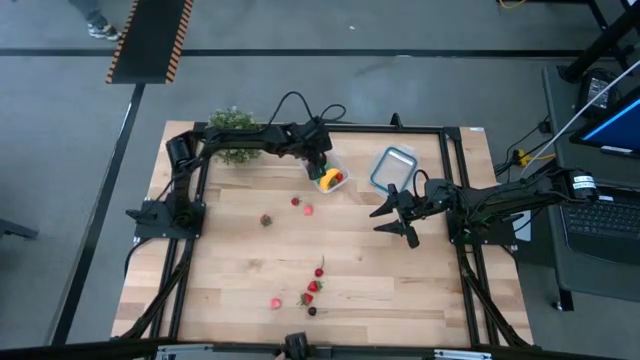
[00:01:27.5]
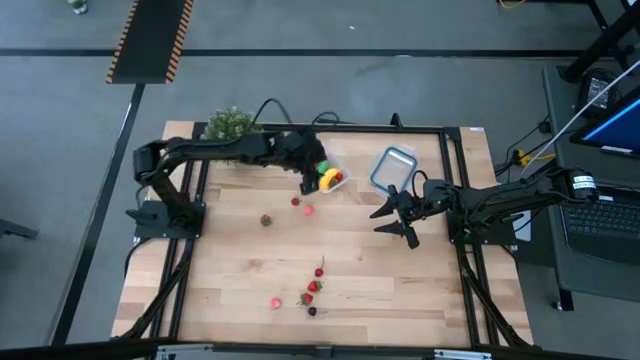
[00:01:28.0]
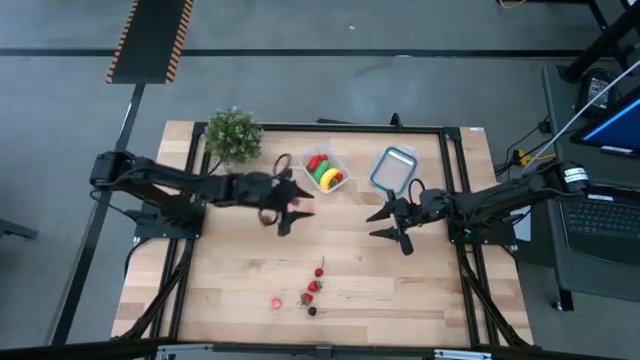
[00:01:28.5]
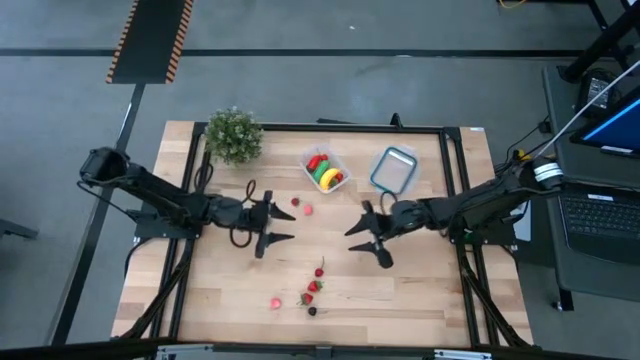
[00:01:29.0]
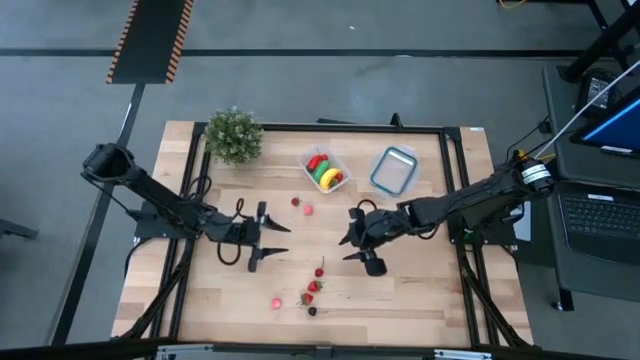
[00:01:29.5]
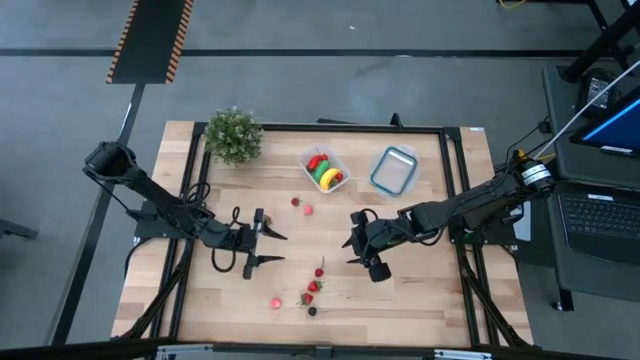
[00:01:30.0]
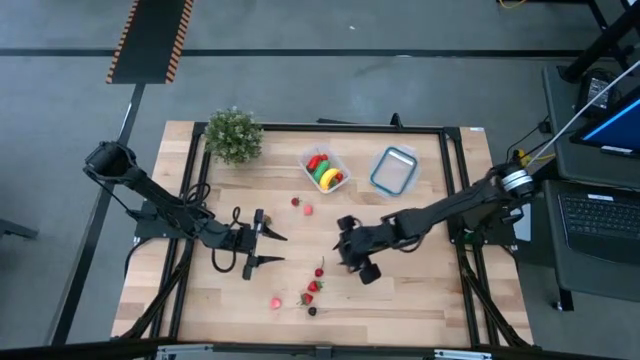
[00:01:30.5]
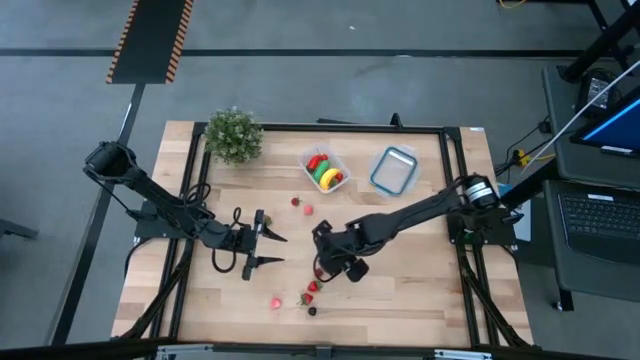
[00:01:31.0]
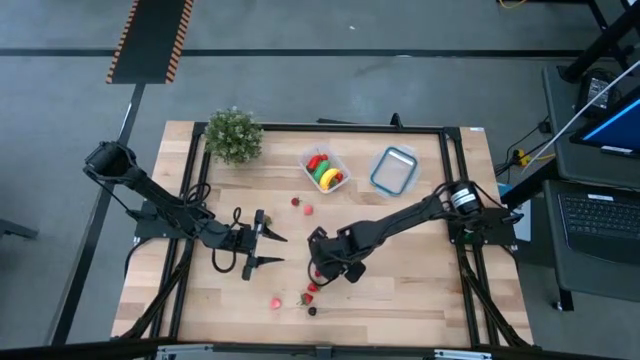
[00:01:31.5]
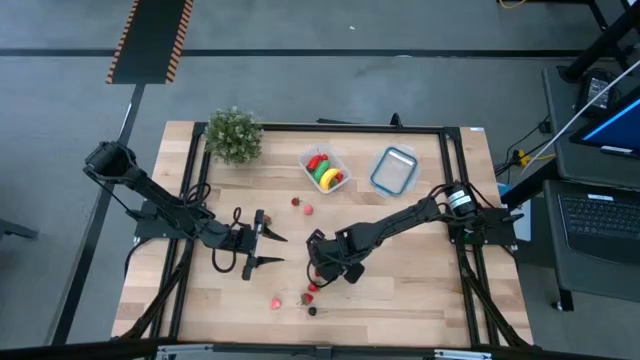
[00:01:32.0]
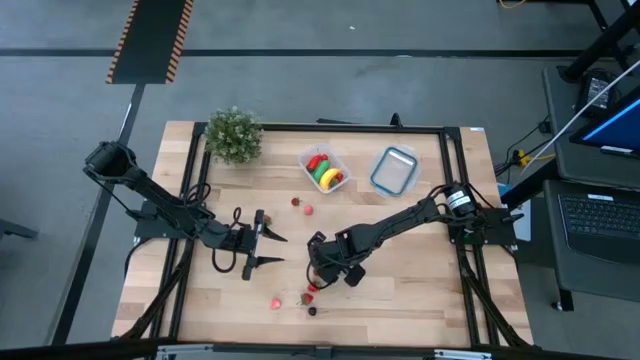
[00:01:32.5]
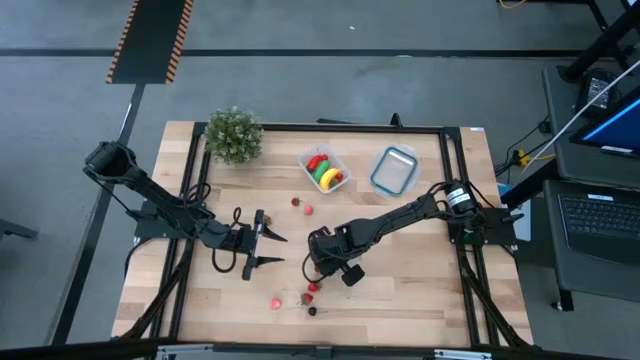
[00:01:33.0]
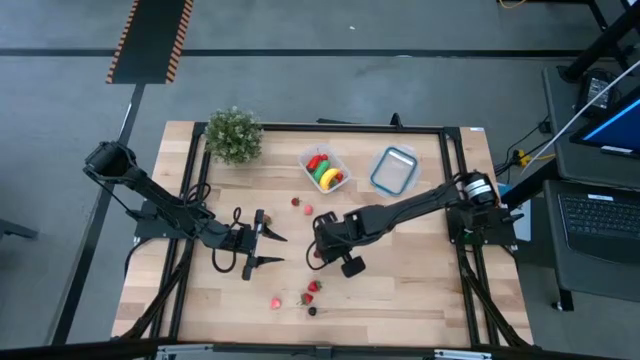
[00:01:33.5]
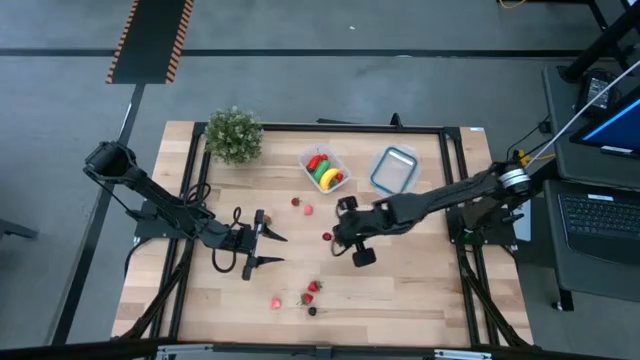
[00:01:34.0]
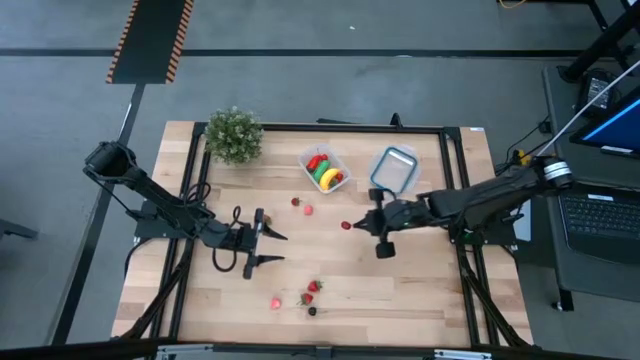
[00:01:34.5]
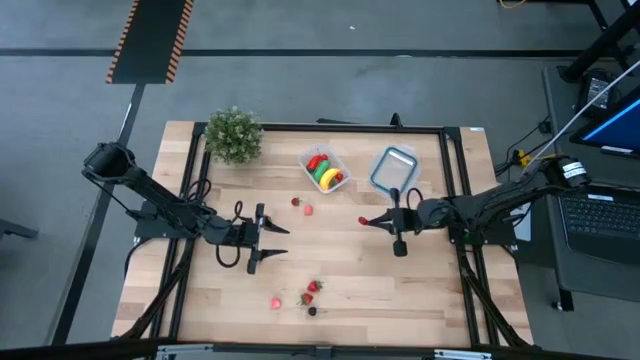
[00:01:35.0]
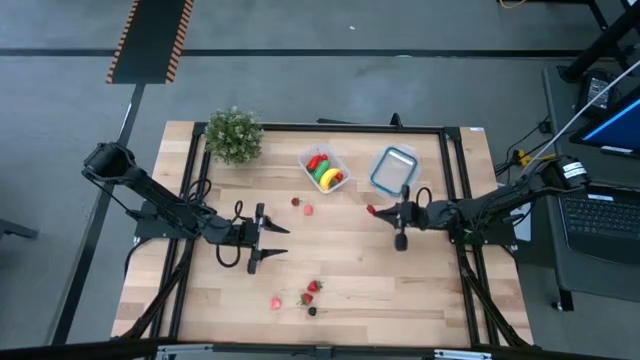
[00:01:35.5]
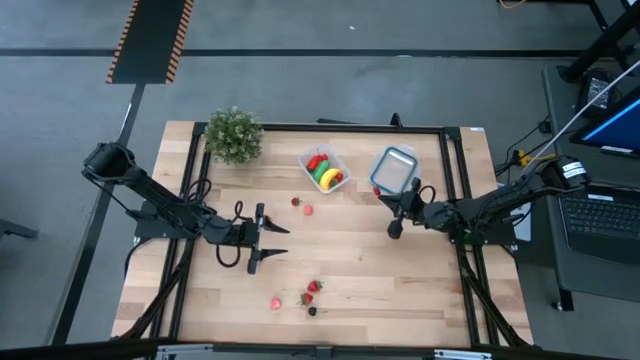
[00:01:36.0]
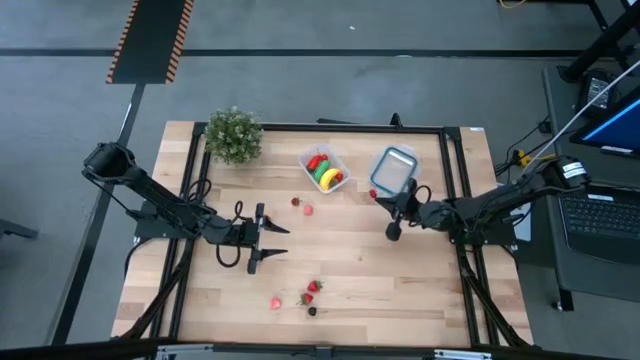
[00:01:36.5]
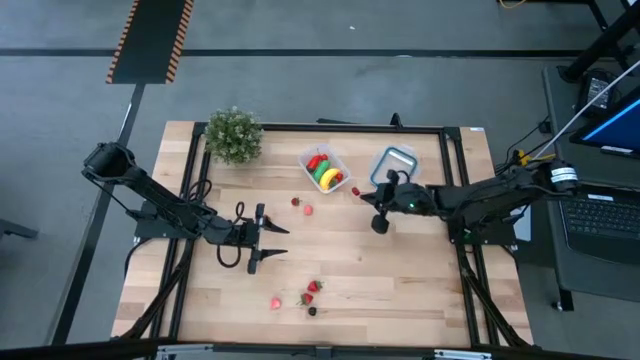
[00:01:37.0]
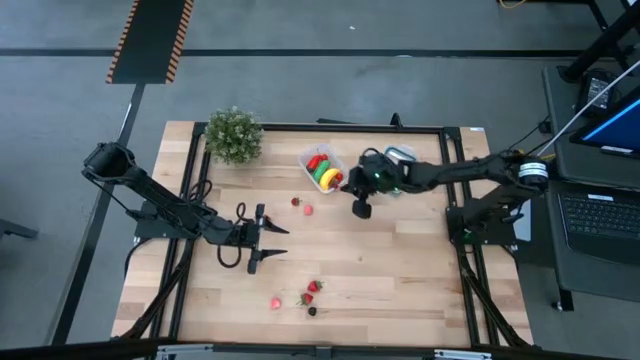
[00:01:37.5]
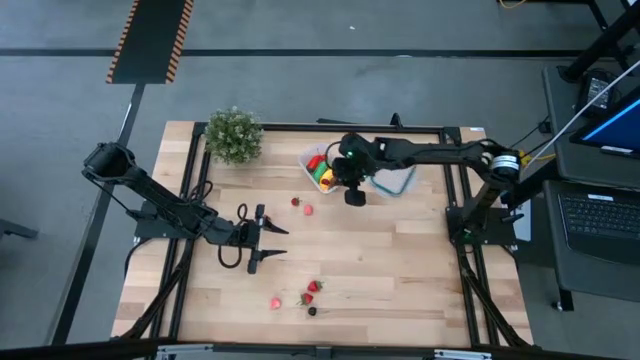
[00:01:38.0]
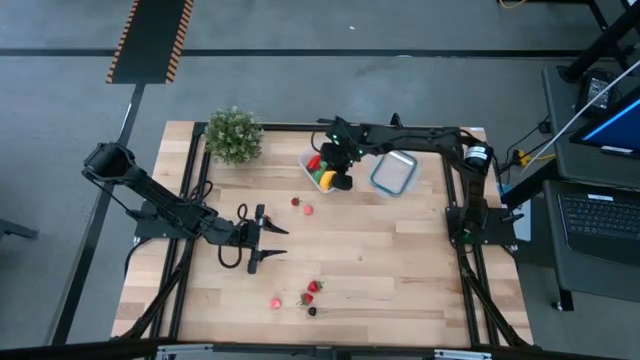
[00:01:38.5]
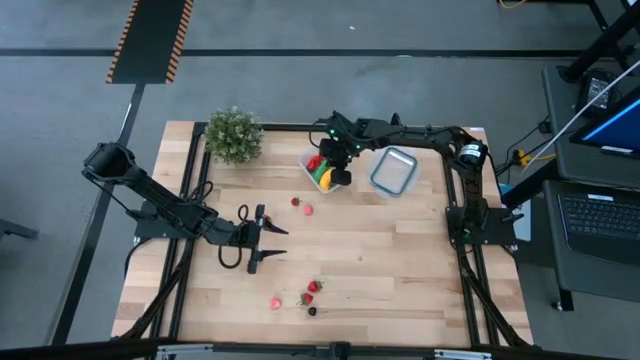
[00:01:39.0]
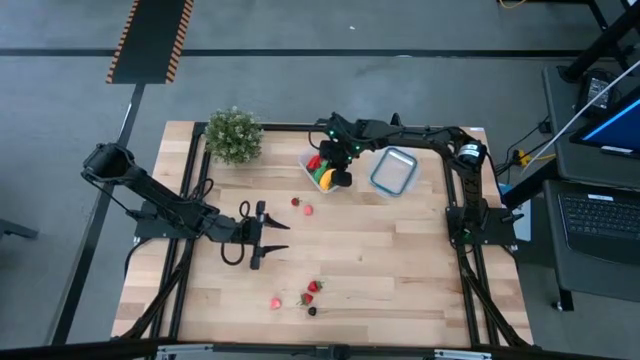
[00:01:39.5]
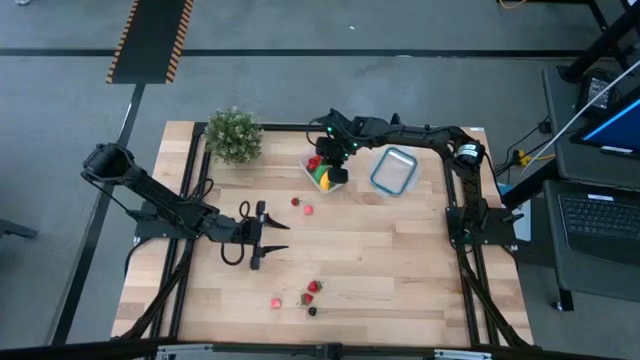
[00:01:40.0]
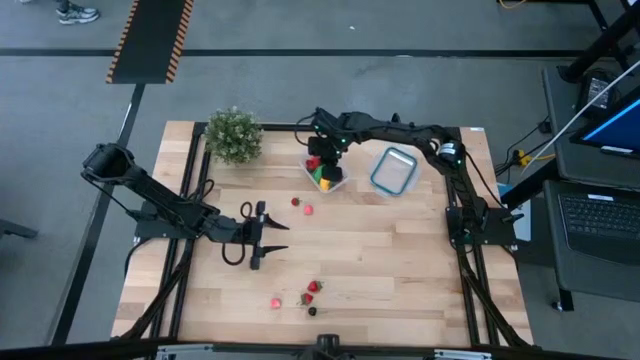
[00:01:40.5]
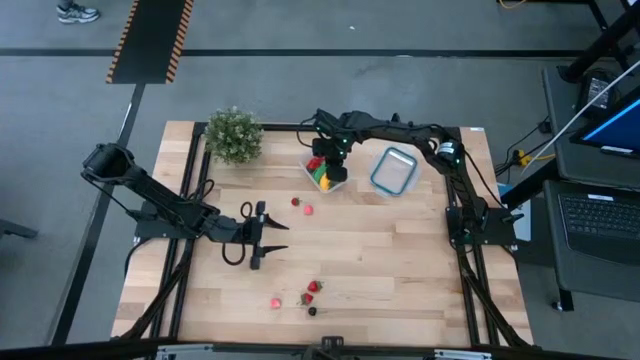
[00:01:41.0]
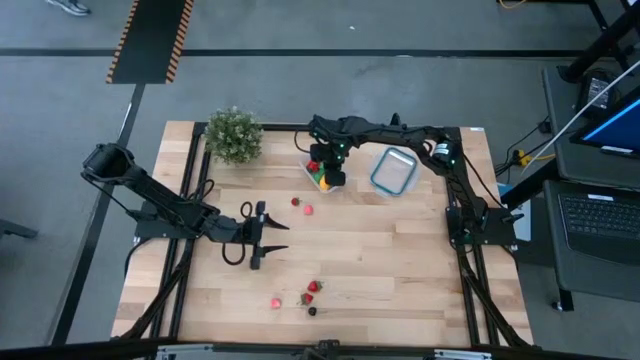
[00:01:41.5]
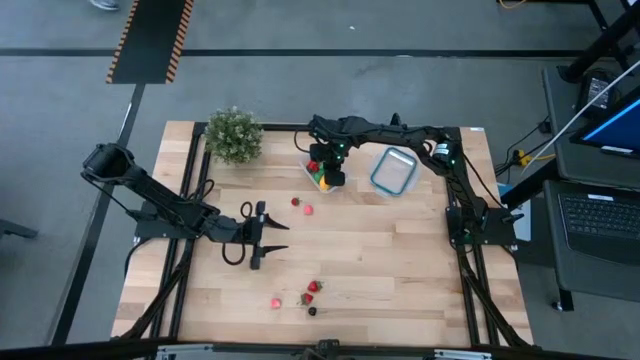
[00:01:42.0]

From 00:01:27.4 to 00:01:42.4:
Task: Pick and placing Produce into tupperware
Put the red cherry into the transparent container

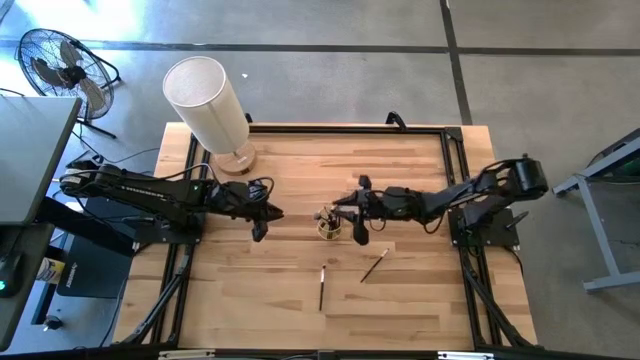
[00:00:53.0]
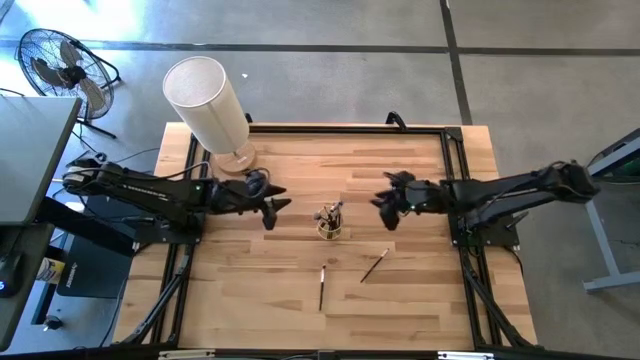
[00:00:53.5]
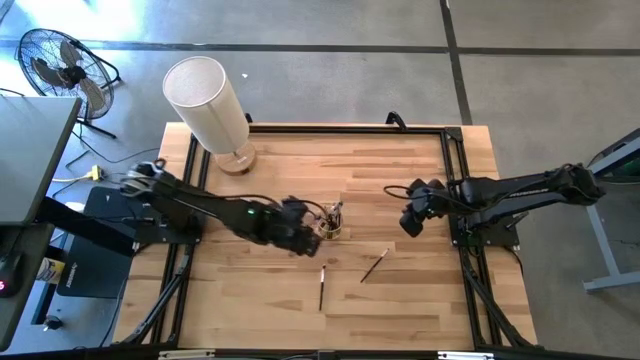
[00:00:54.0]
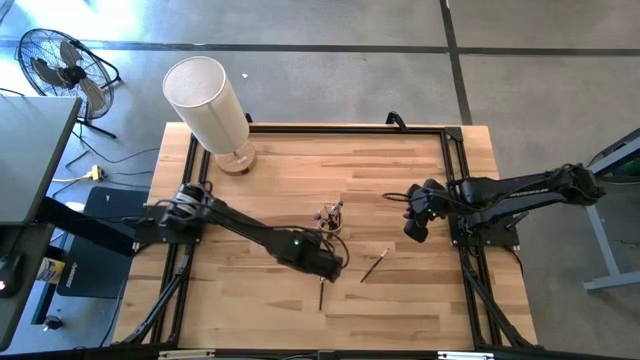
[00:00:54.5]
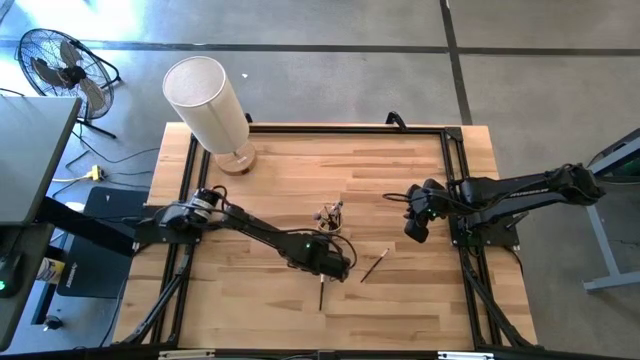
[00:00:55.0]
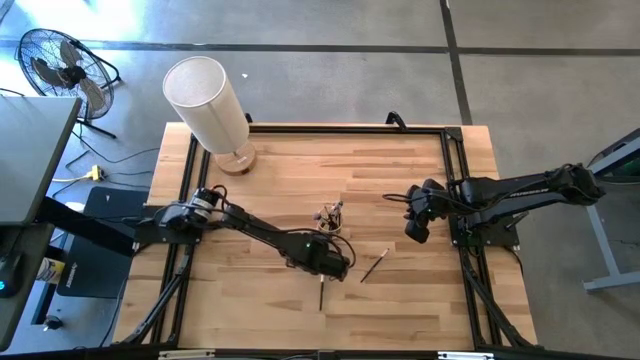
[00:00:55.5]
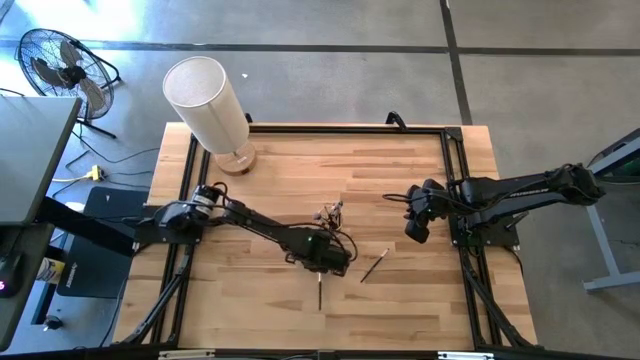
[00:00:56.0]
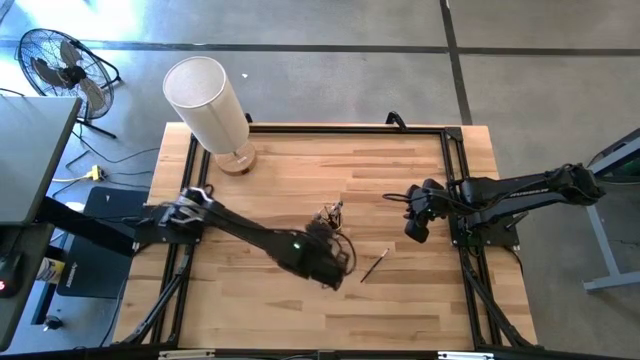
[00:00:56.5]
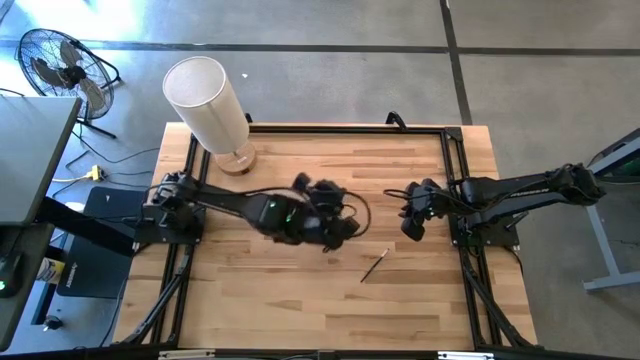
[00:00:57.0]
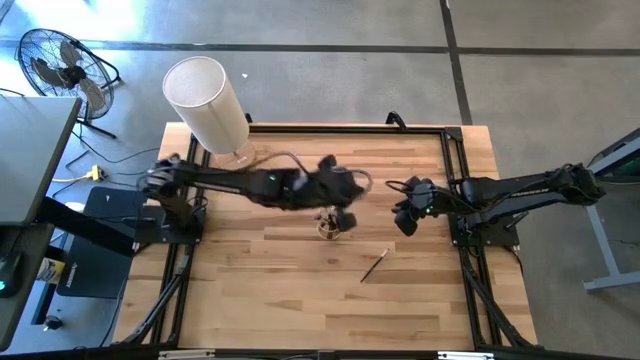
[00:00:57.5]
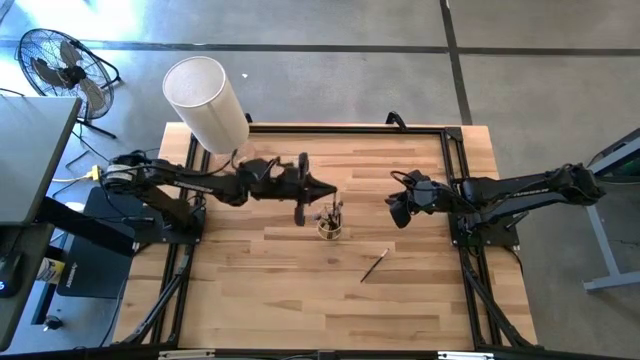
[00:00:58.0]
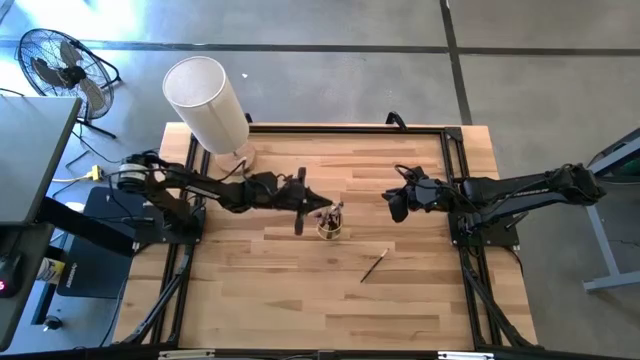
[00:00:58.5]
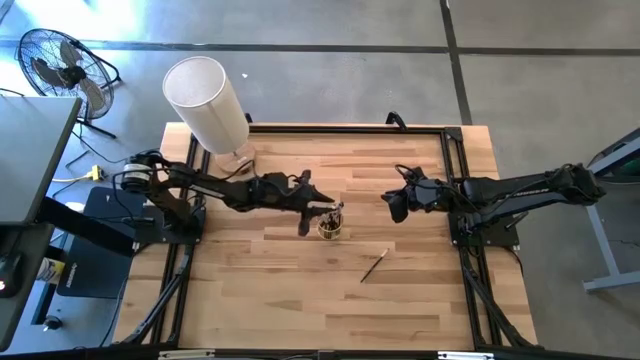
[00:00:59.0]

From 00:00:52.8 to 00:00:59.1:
Task: Put items in baskets/containers
Put the eyeshadow brush into the wire organizer
